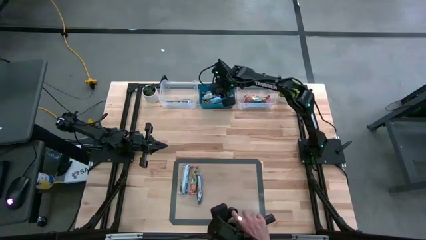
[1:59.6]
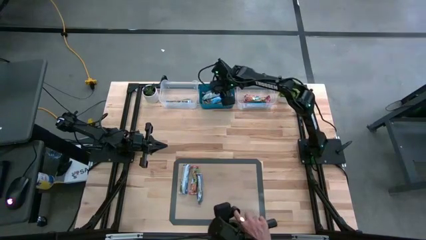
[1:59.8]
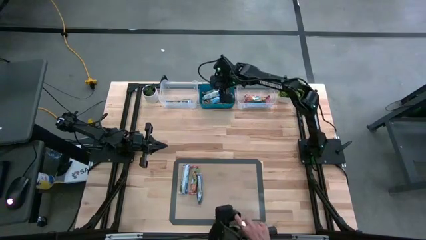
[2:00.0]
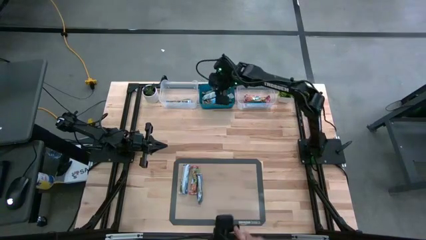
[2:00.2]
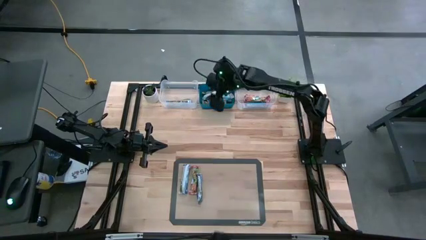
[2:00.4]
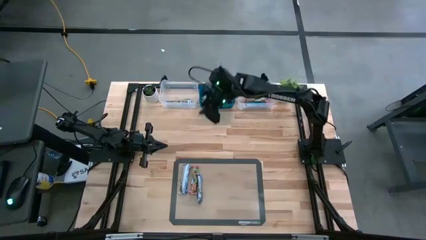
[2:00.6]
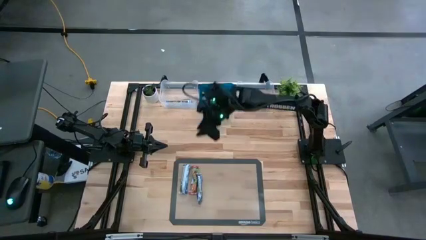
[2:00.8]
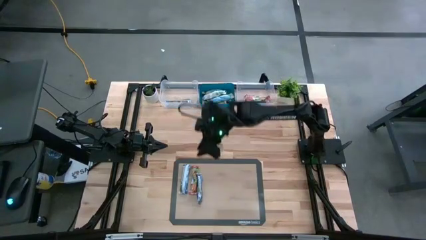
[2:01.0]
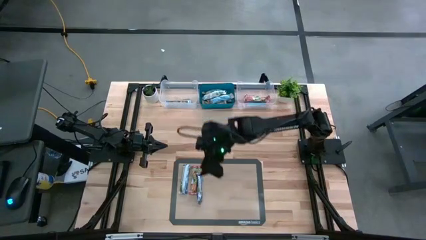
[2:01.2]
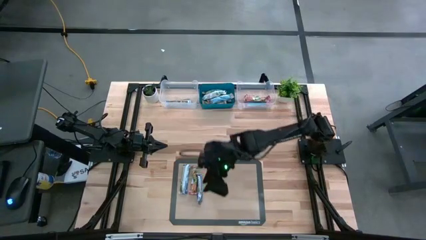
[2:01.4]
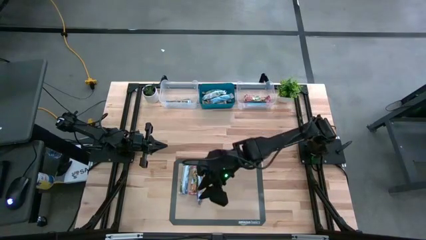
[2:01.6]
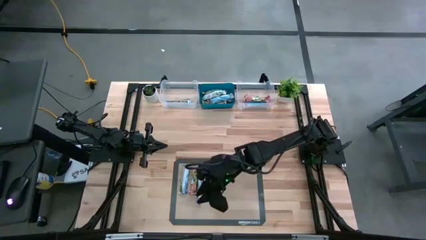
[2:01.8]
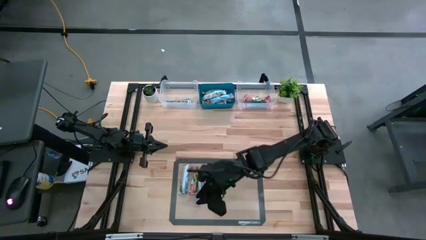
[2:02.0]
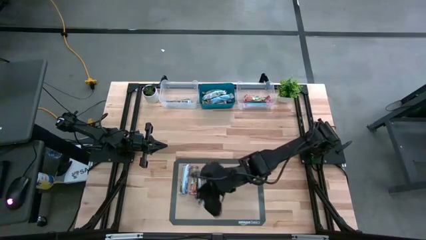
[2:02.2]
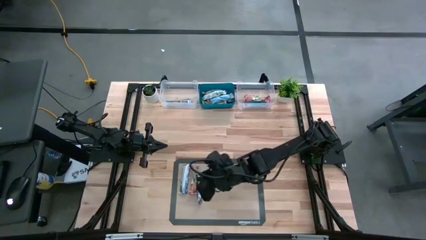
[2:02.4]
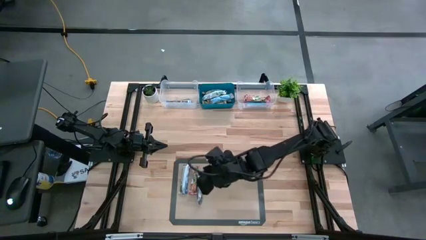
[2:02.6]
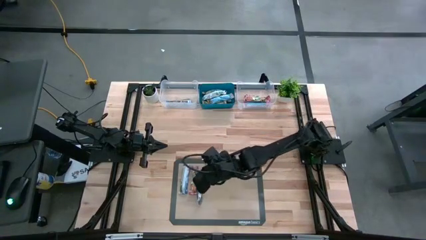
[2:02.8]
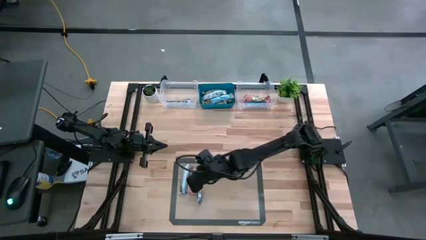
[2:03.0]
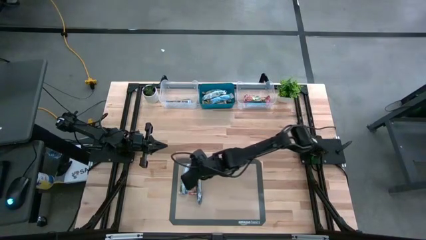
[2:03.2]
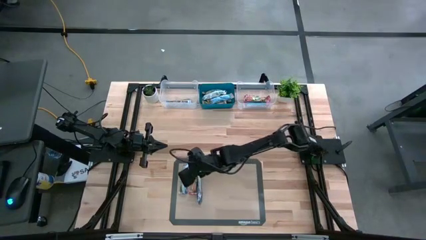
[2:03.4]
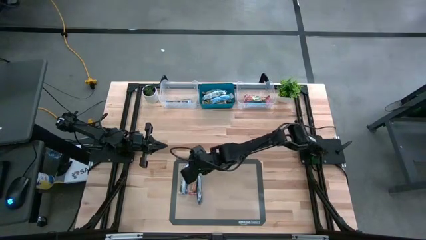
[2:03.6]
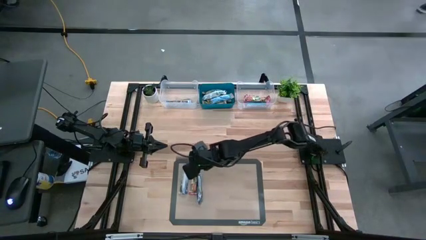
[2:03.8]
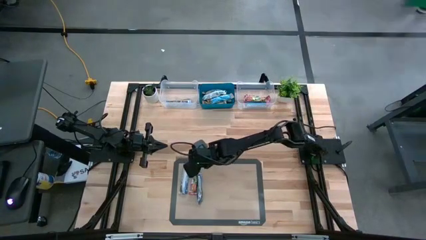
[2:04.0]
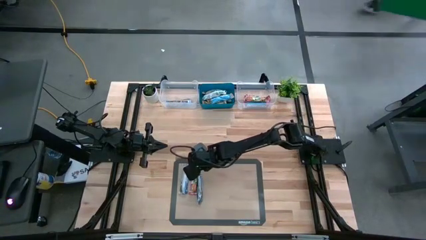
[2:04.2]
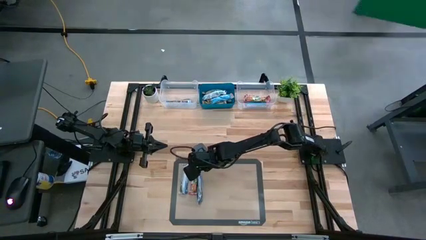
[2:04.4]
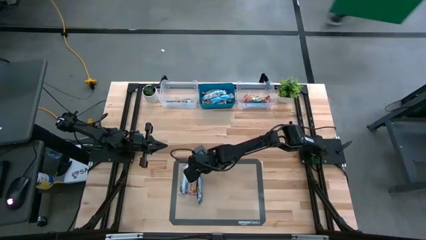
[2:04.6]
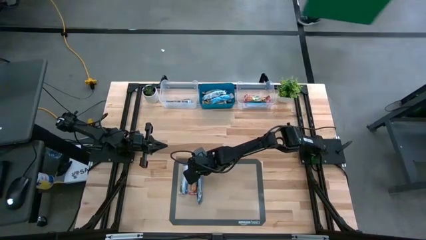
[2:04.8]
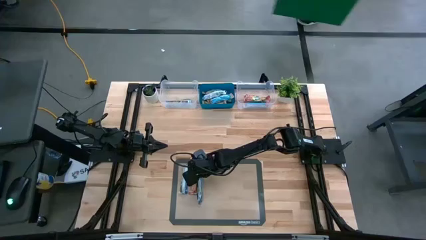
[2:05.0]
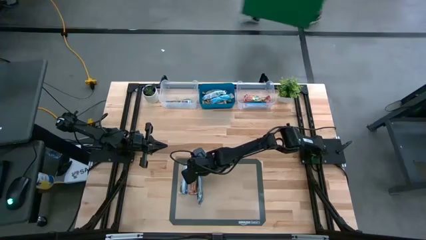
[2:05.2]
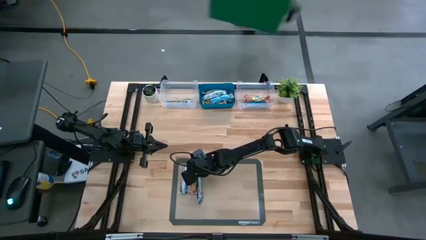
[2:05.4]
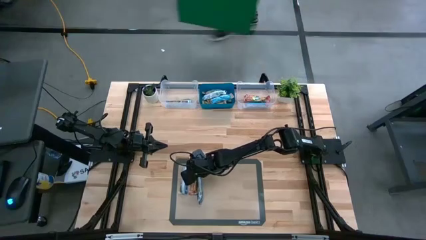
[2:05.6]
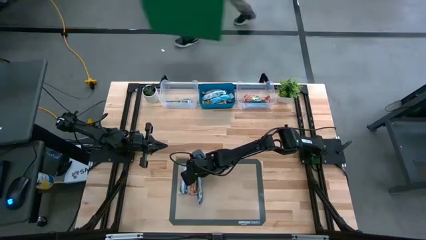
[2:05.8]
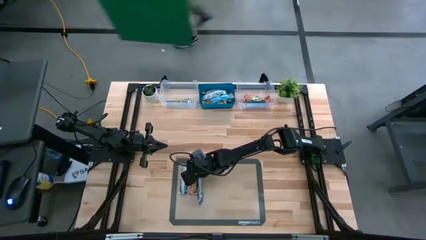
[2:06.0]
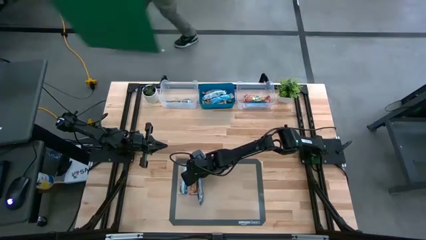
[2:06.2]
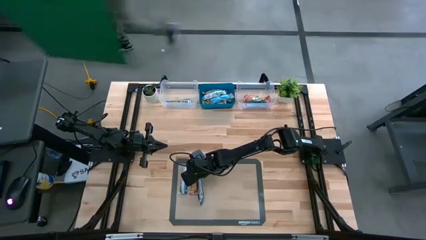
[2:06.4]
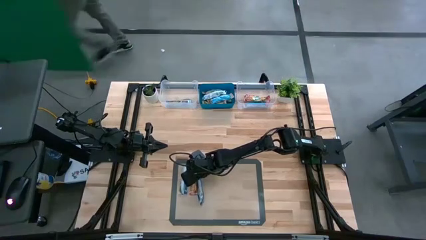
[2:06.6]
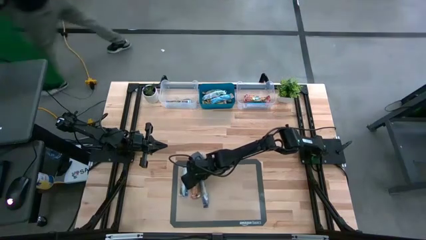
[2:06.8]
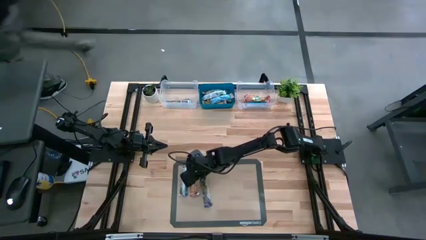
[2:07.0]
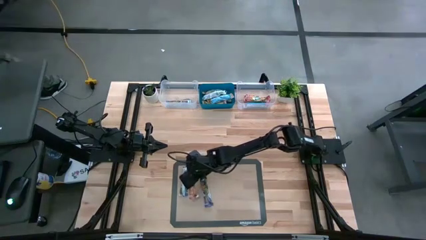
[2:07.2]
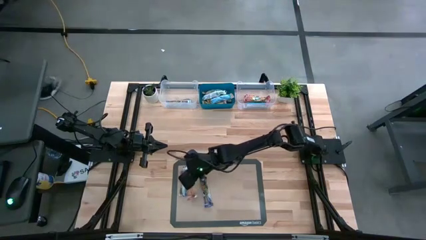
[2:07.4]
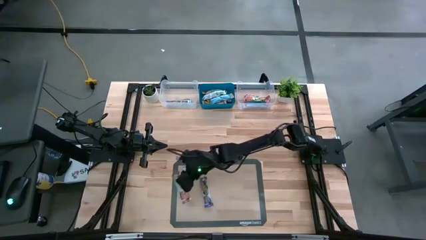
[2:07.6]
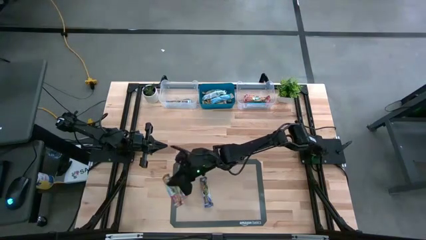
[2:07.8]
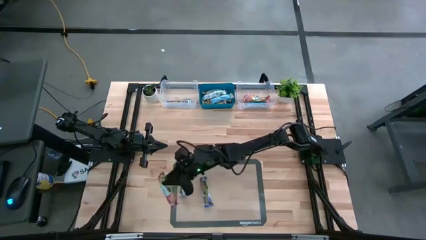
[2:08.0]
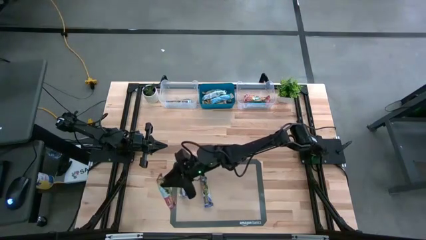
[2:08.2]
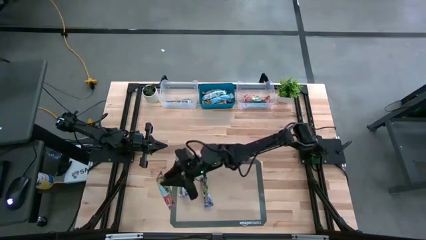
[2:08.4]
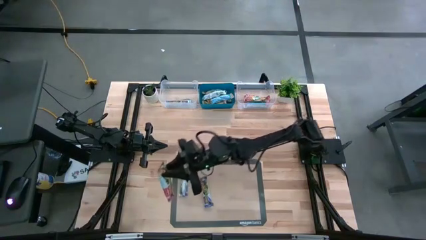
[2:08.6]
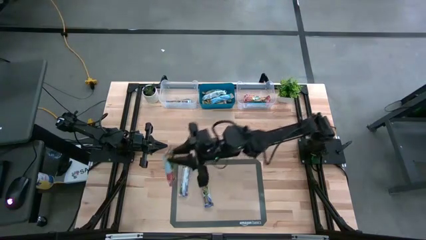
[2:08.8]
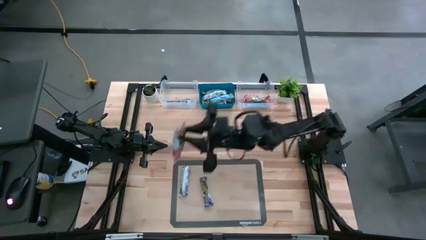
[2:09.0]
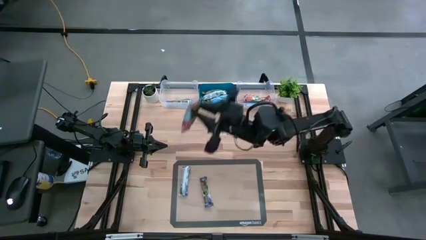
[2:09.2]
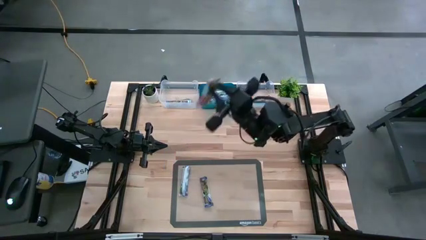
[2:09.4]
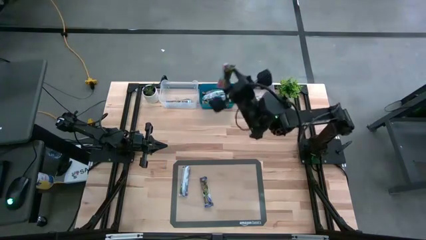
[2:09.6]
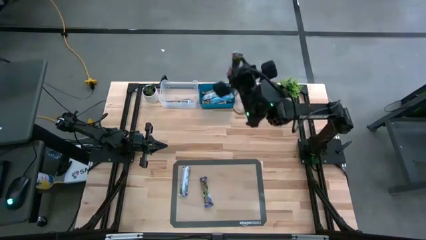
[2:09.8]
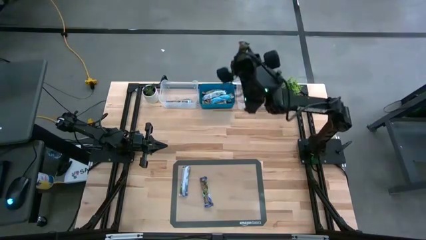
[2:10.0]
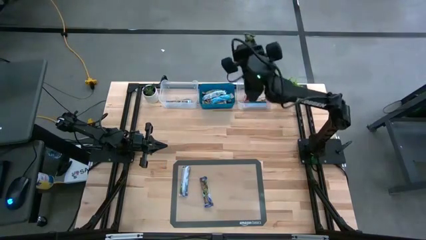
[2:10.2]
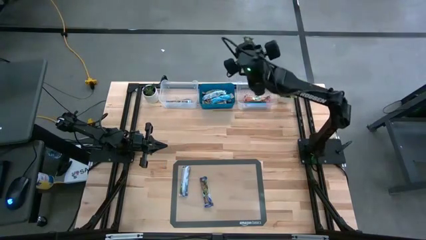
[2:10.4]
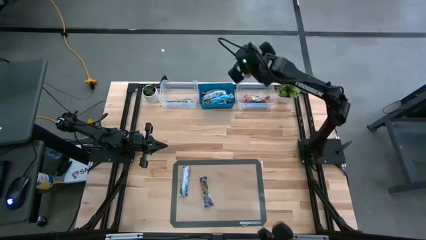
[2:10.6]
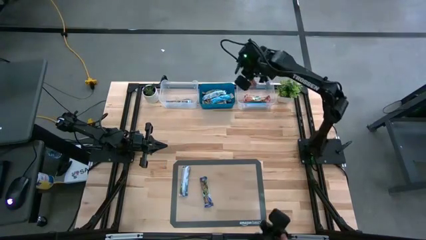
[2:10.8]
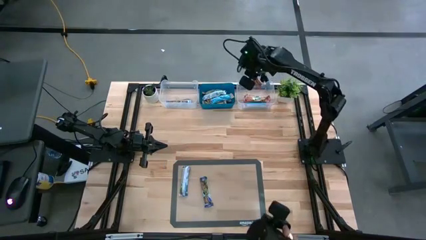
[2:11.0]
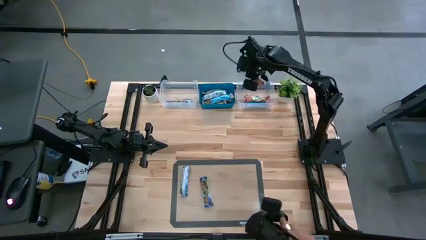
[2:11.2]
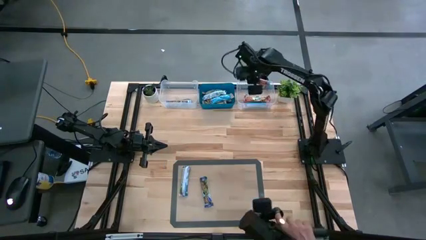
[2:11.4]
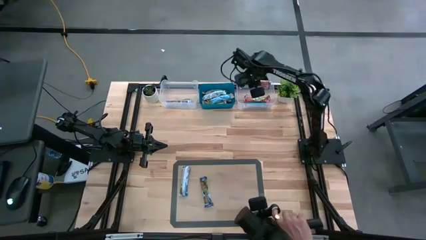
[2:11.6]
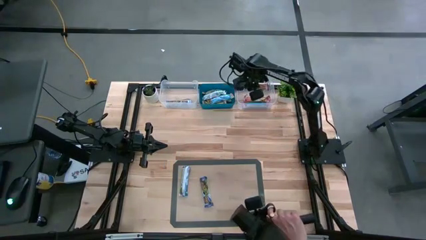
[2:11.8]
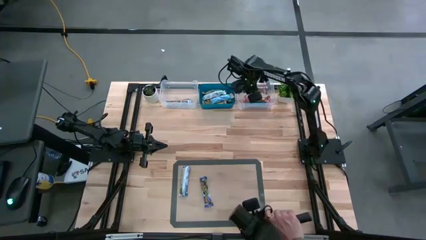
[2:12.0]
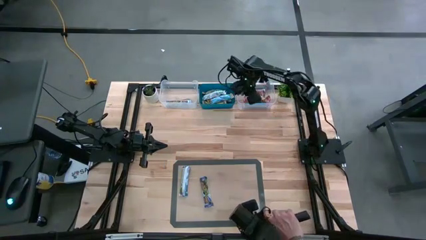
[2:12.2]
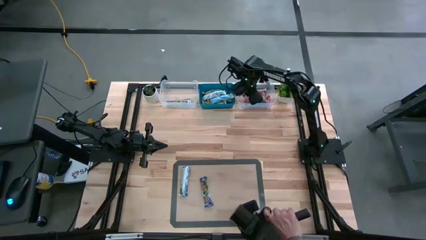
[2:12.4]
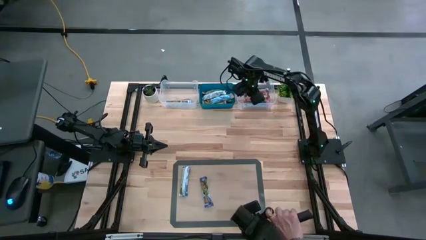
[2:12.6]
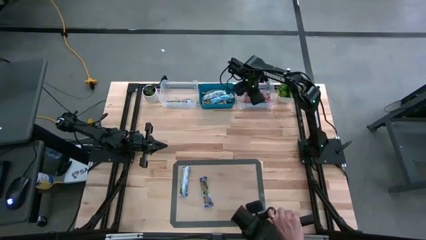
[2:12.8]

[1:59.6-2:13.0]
Task: Pick and place Granola Bars by type
Put the red granola bar into the right transparent bin

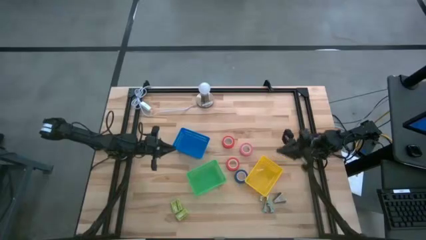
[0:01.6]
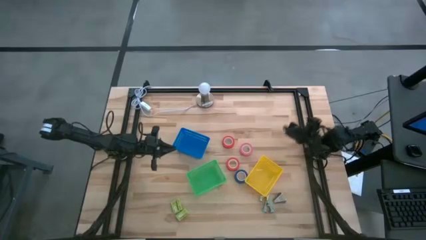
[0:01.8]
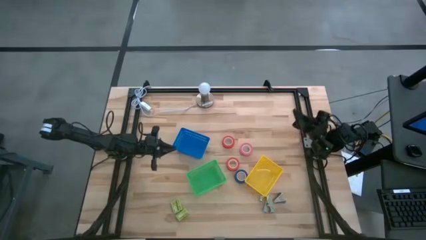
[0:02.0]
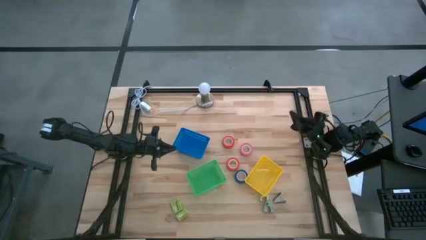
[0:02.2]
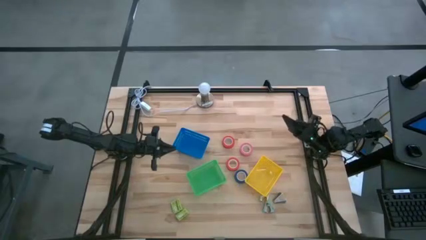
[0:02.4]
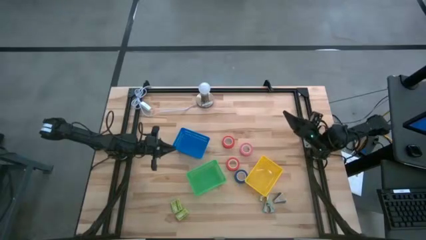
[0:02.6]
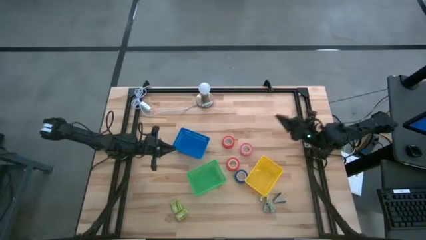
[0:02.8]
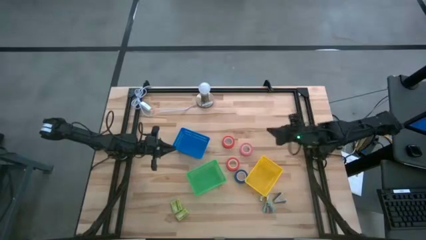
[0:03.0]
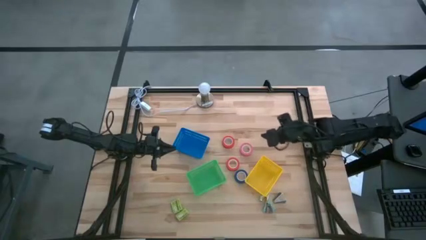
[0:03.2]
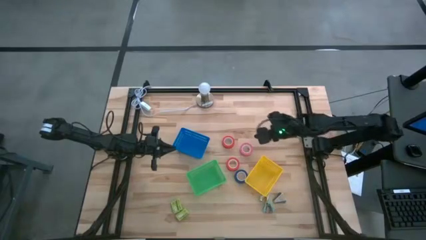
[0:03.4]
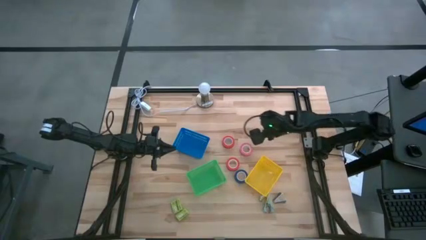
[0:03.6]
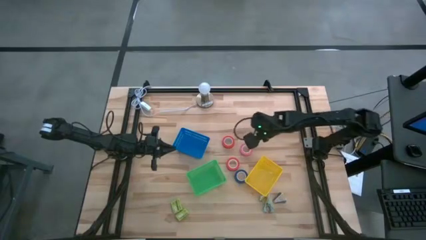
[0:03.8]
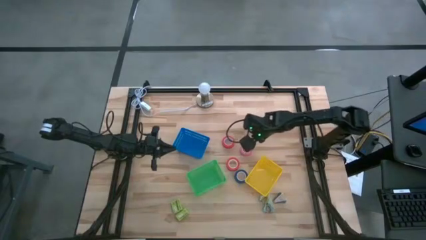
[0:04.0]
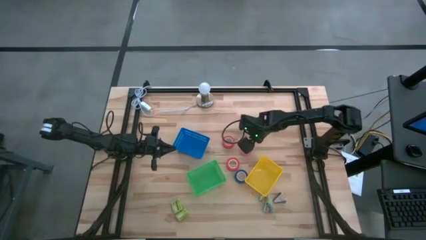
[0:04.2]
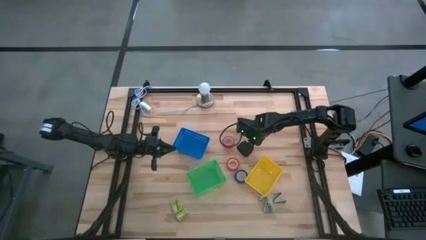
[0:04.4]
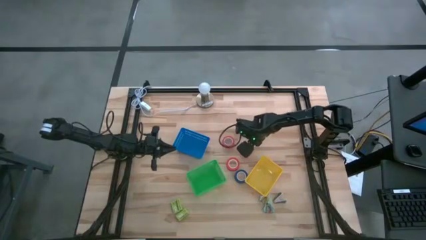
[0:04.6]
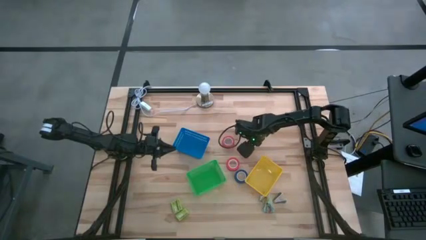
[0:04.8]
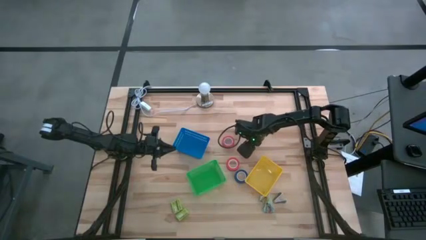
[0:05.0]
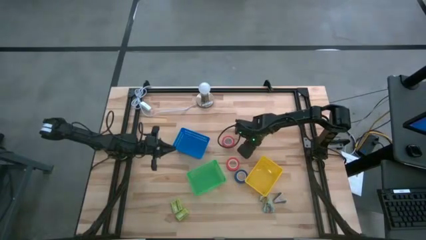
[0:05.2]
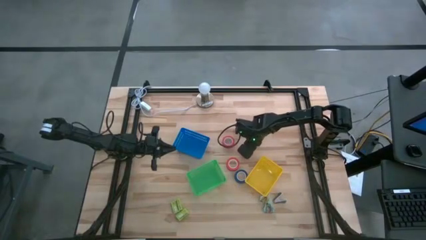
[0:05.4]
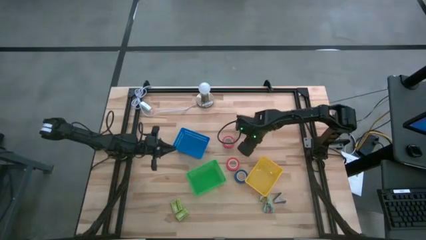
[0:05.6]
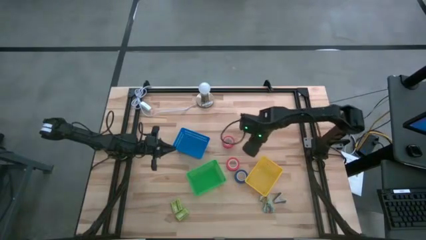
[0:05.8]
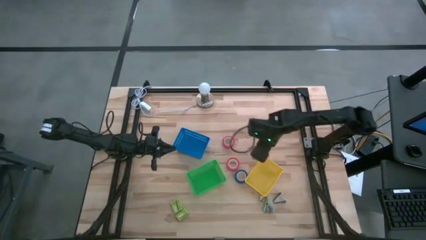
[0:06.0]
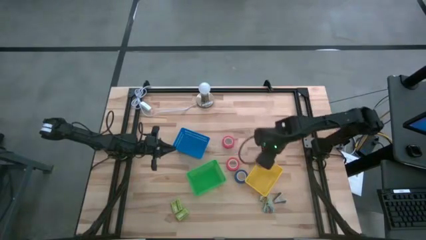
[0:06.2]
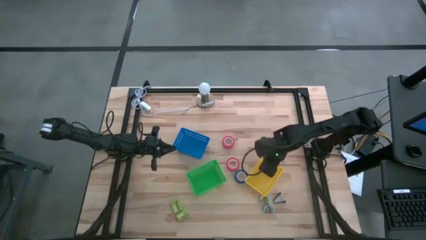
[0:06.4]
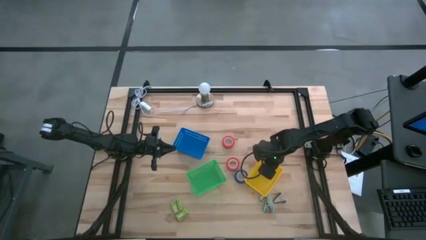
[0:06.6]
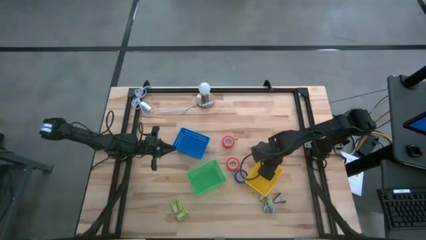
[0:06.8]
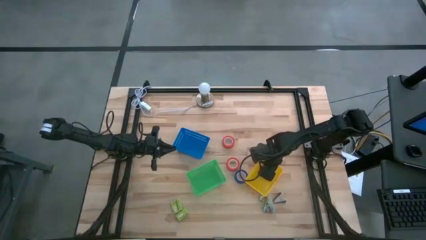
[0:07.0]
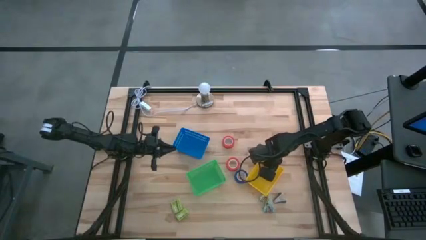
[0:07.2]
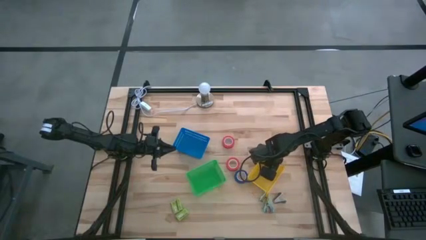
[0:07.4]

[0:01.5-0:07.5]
Task: Pick and place Stapler, Stapler remover, tape
Put the pink tape into the yellow bin
